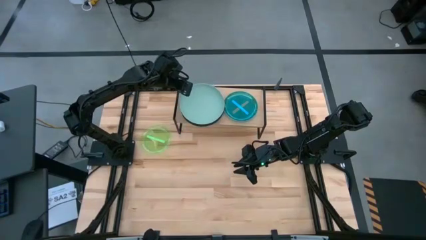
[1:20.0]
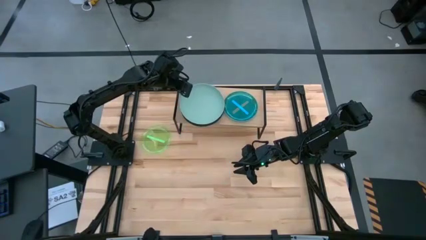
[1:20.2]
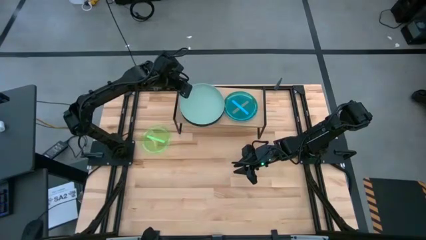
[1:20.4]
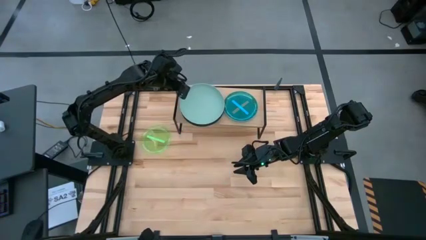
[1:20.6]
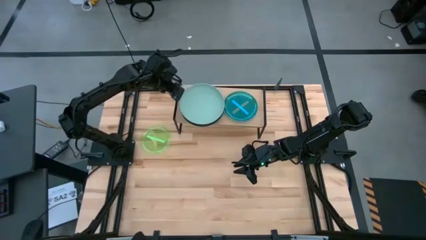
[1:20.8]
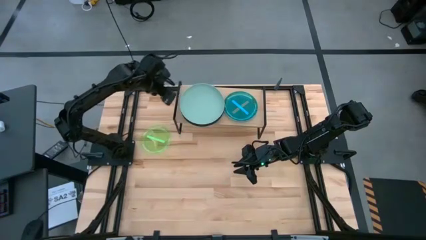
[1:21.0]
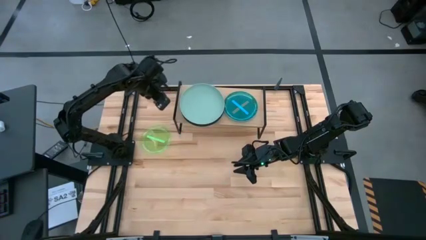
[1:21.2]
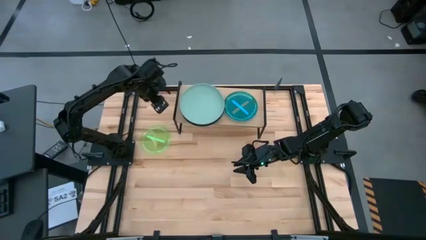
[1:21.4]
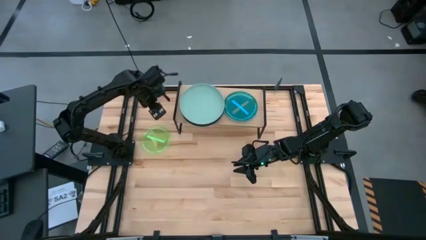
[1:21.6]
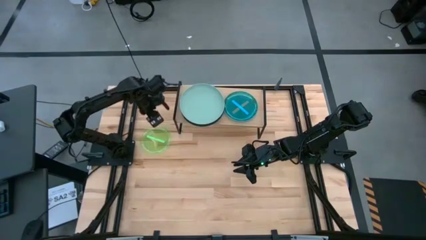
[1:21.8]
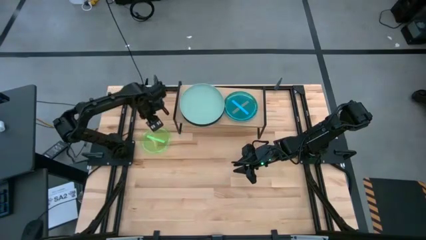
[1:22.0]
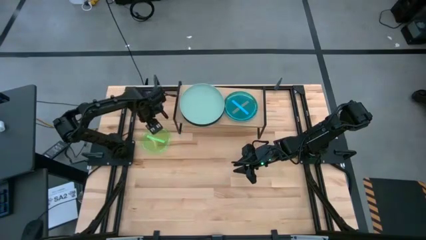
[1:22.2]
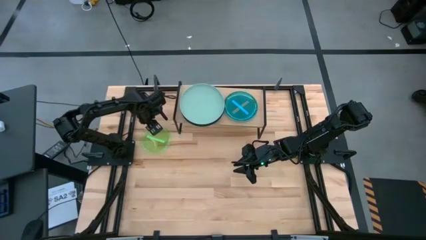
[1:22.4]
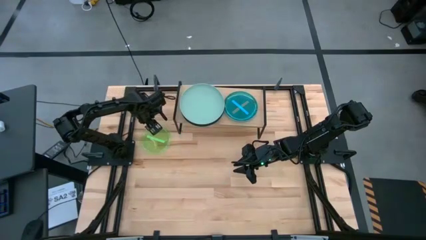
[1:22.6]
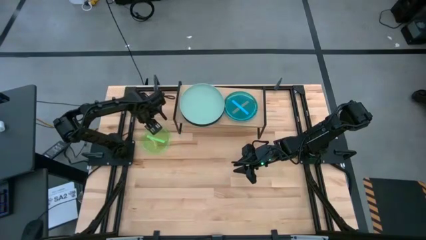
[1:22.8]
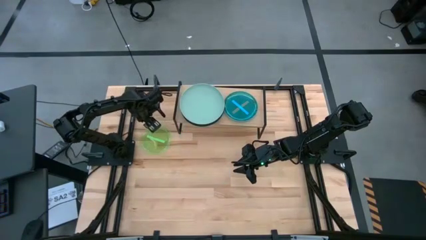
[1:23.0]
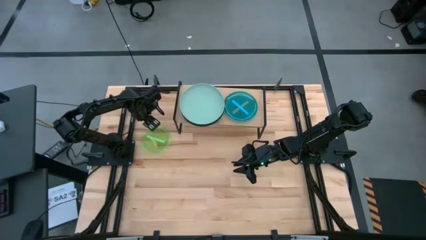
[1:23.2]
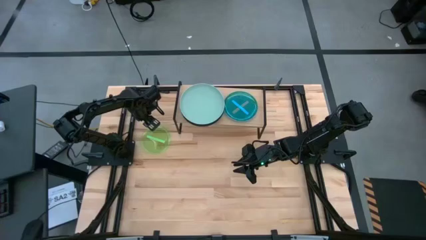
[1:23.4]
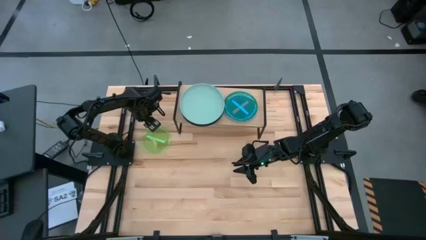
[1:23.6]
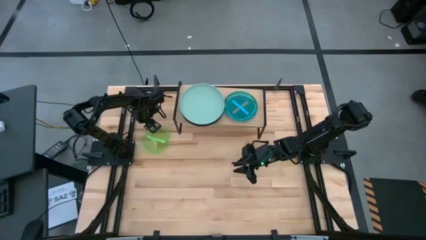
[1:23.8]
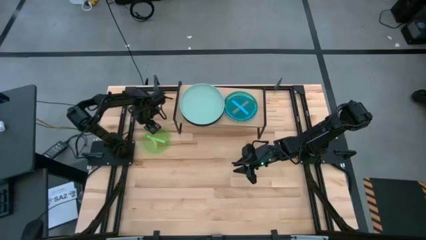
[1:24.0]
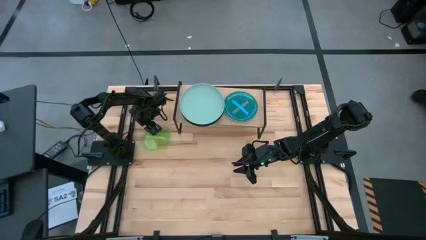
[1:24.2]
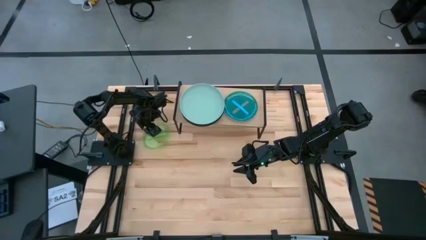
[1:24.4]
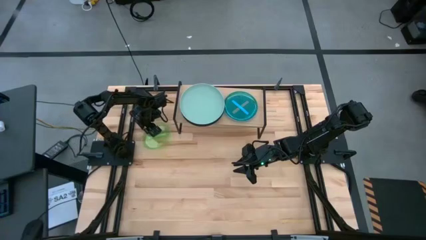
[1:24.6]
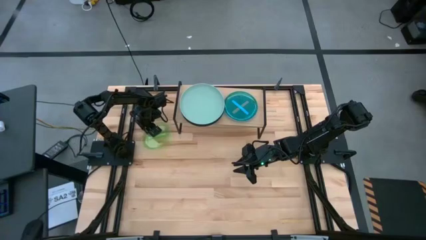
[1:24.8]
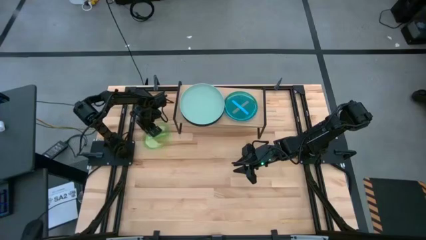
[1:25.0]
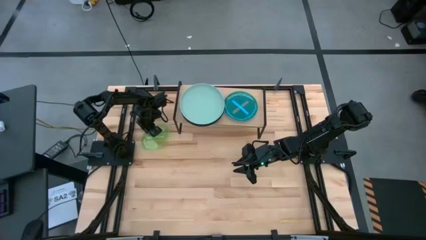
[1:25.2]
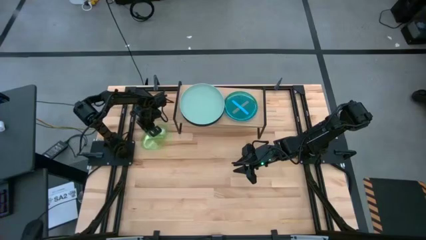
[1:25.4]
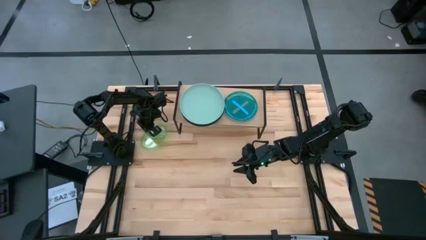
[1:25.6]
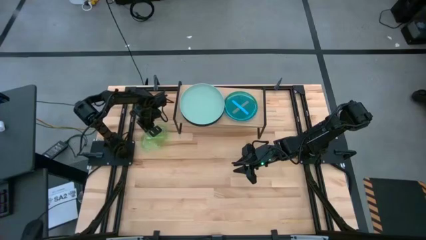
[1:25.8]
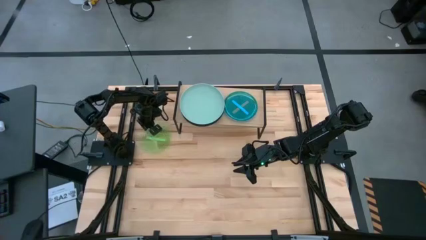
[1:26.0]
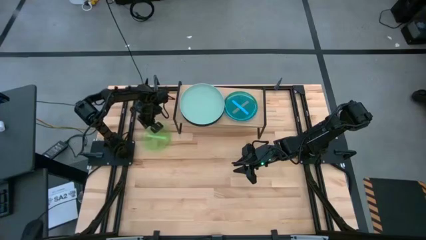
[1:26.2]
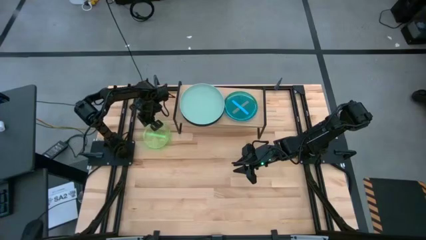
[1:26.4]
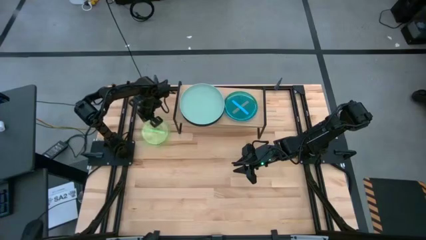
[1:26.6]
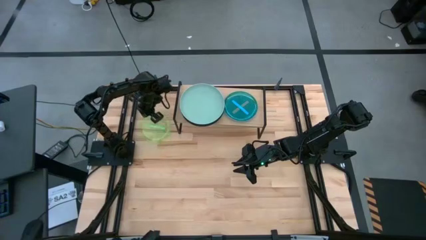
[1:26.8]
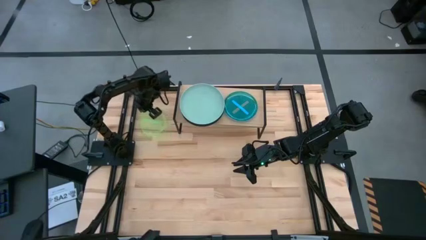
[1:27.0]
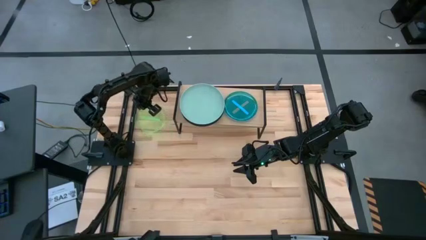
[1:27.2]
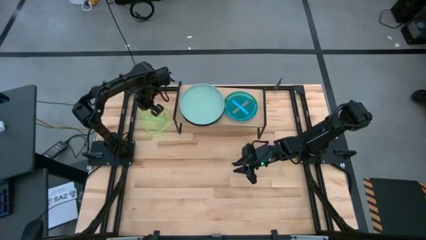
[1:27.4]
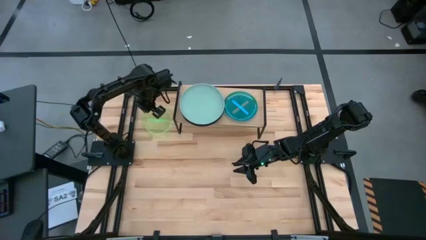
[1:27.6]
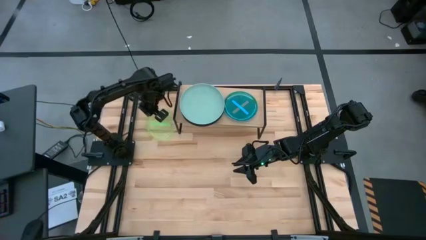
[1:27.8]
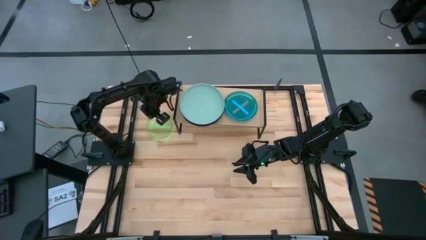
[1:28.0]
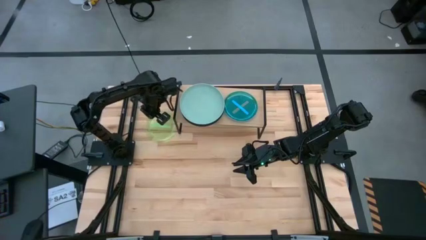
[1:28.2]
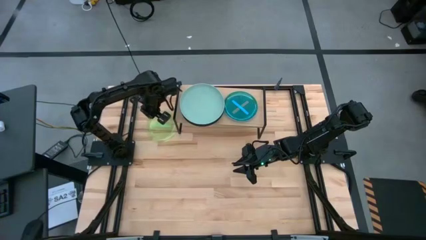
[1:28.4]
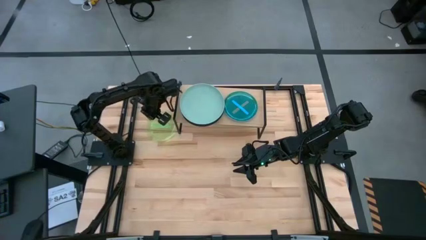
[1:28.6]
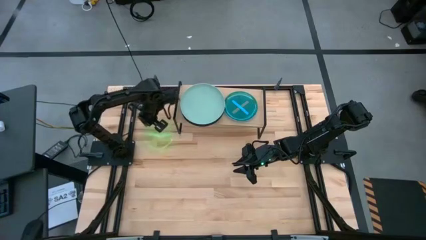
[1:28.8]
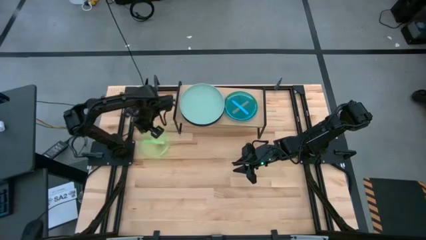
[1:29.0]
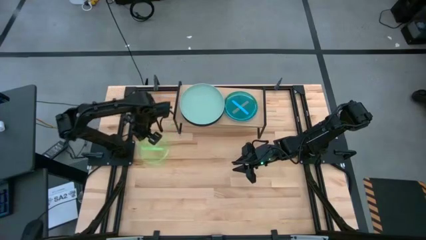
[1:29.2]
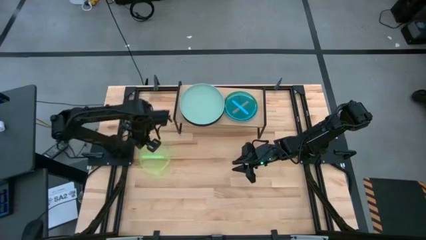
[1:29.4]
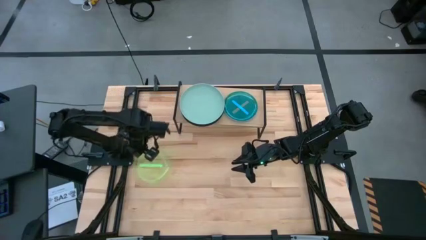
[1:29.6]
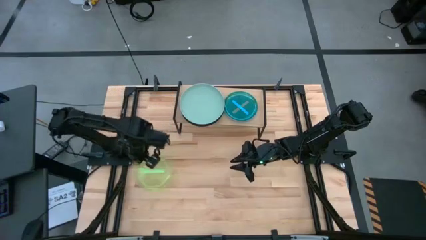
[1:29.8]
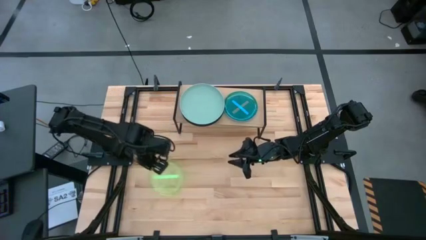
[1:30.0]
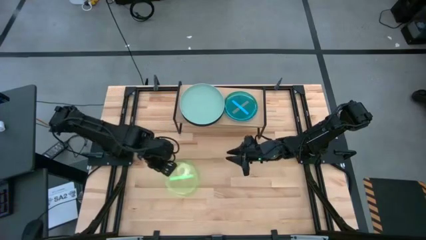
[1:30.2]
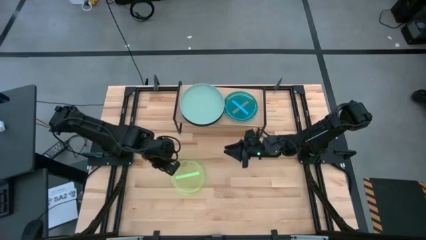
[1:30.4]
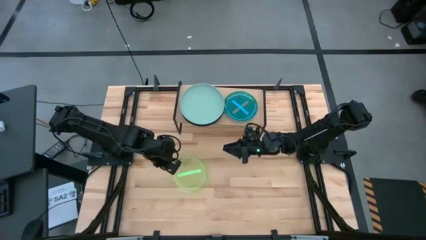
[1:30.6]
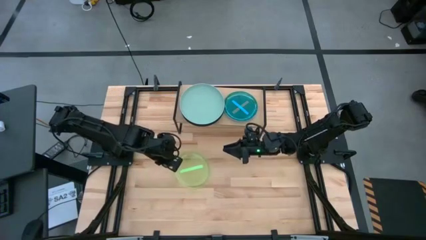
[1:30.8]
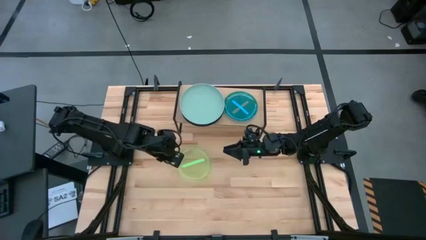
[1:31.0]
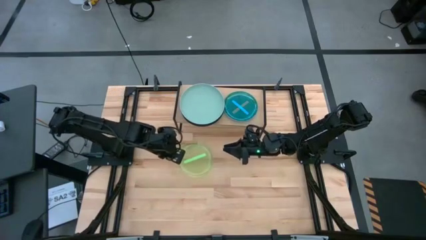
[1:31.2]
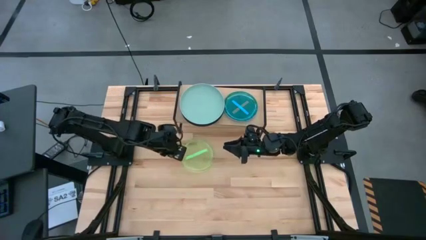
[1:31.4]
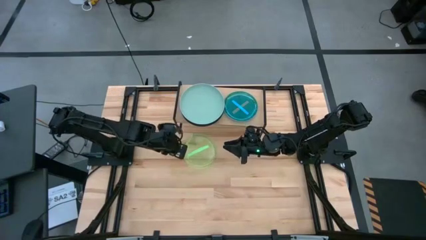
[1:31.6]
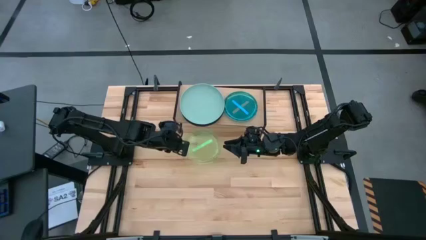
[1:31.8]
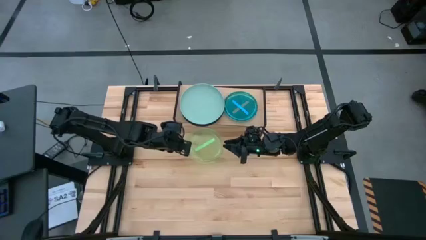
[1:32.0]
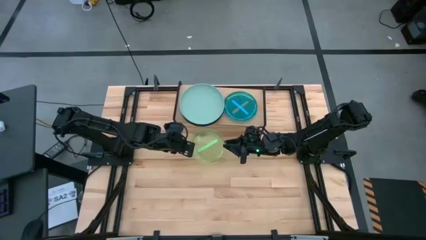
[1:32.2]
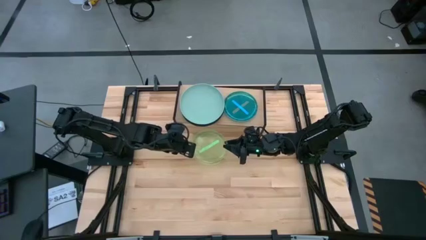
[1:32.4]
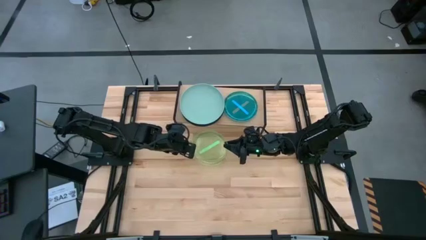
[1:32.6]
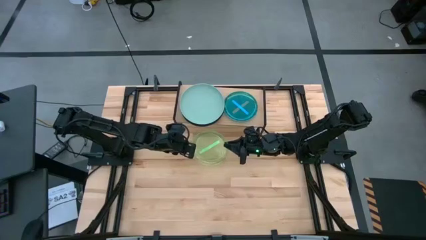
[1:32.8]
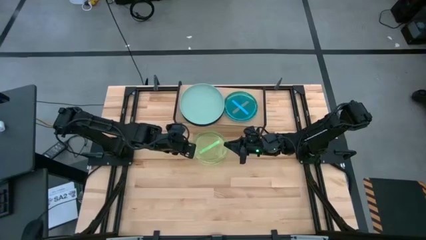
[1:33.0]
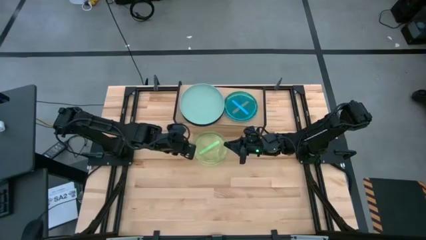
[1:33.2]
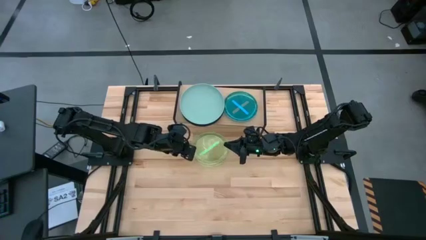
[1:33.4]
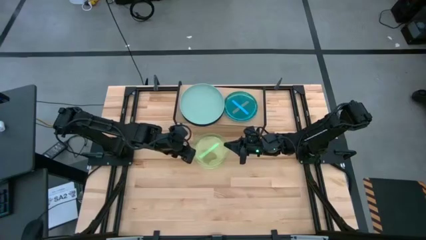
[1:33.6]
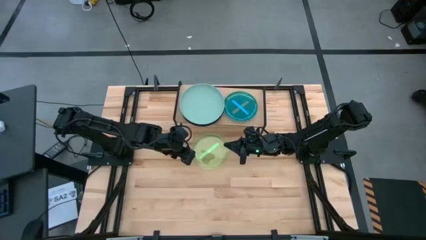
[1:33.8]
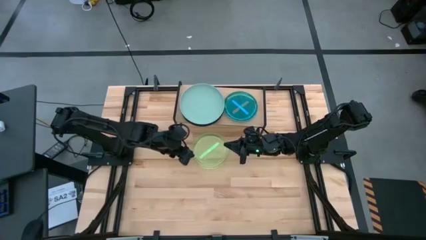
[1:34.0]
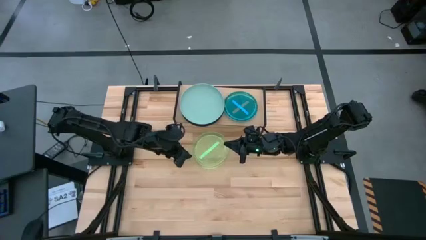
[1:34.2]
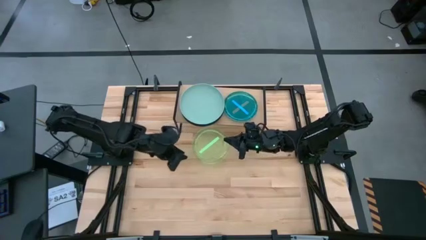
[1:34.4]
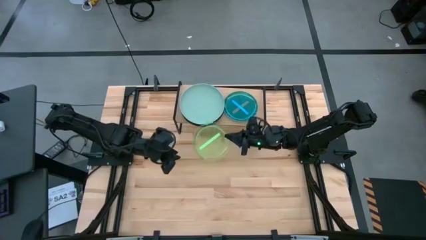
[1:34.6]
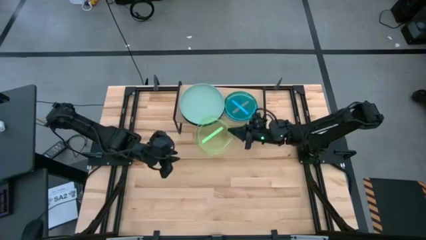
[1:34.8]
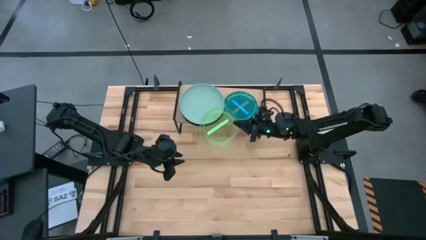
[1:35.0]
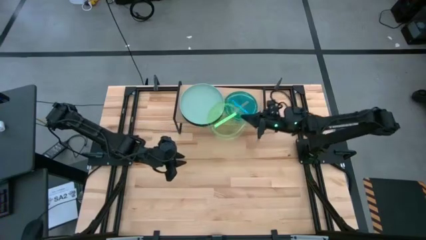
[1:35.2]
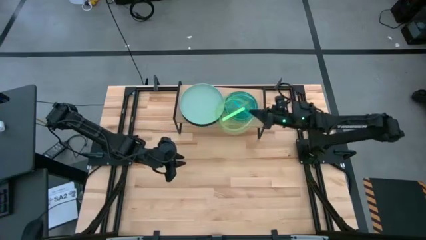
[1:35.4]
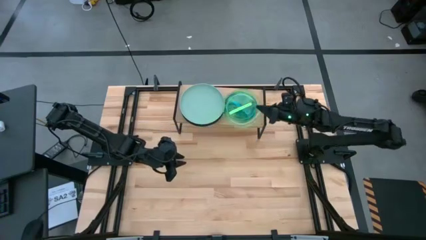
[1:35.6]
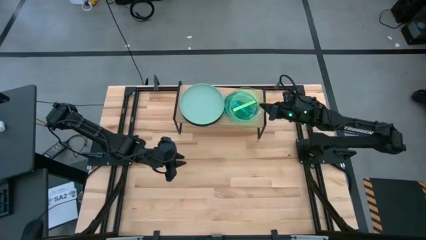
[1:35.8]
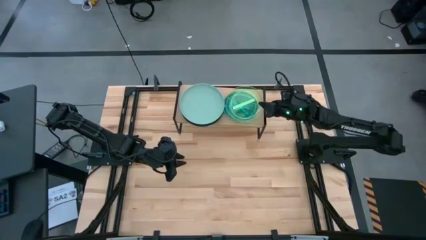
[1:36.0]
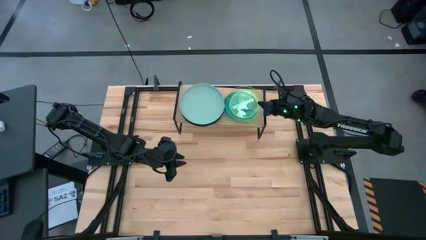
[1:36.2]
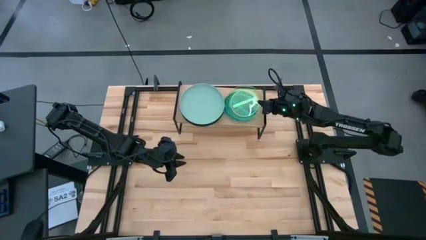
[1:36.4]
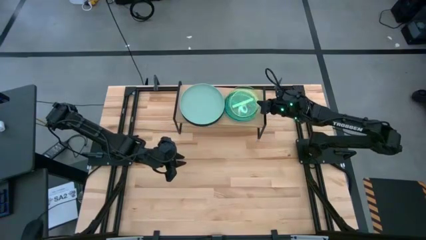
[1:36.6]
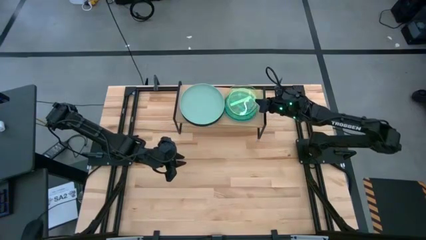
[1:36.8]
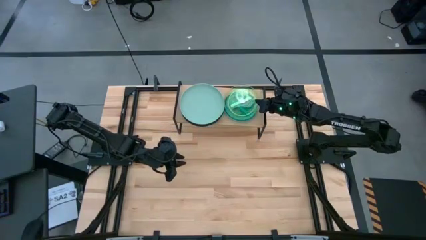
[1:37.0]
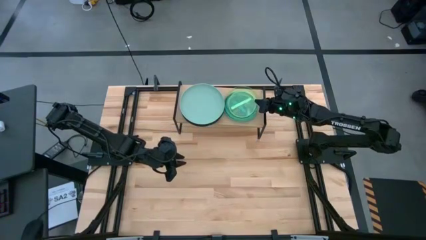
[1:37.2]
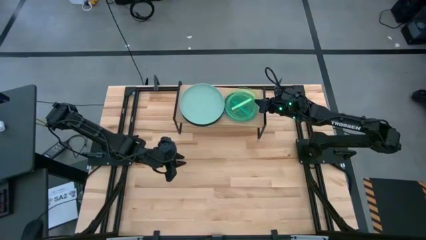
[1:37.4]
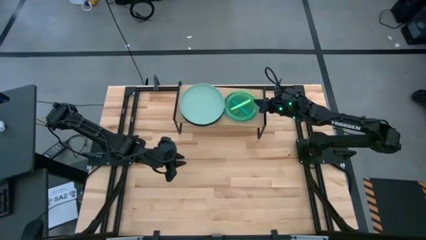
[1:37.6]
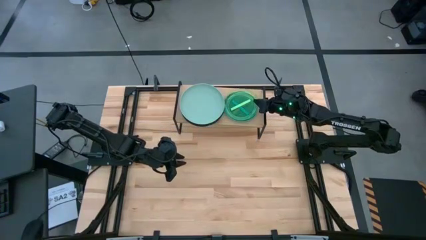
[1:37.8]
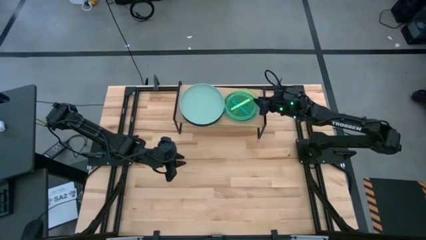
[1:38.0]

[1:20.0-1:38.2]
Task: Place and stack plates onto a shelf
Stack the green plate on top of the blue plate on the shelf
